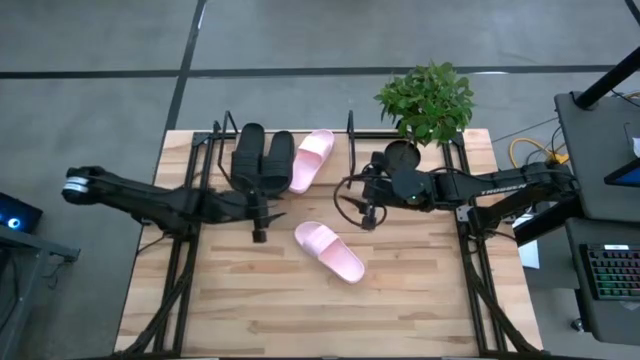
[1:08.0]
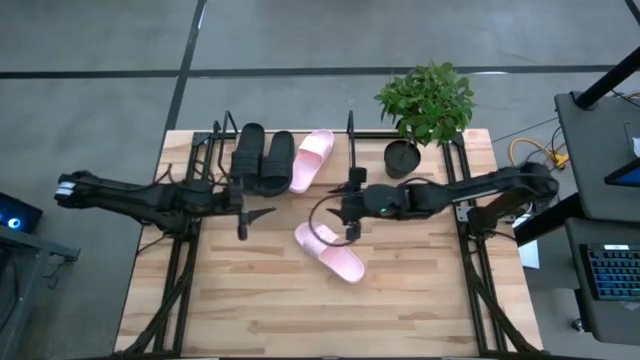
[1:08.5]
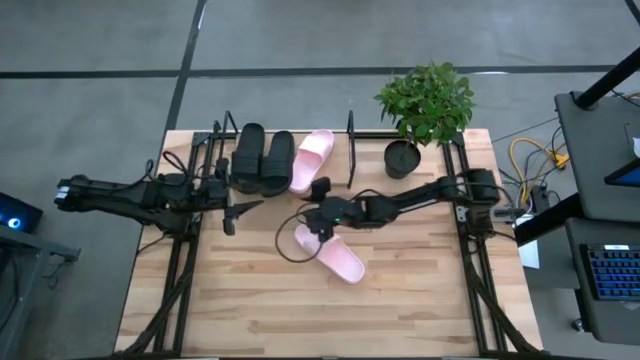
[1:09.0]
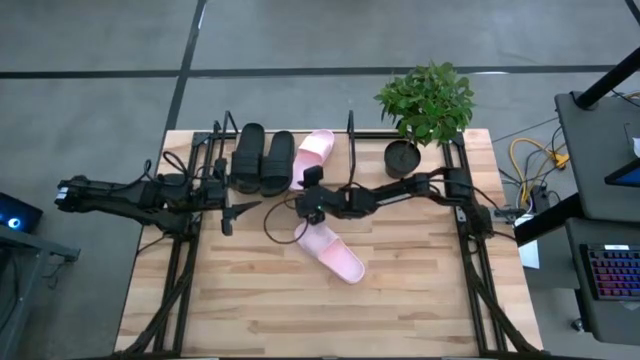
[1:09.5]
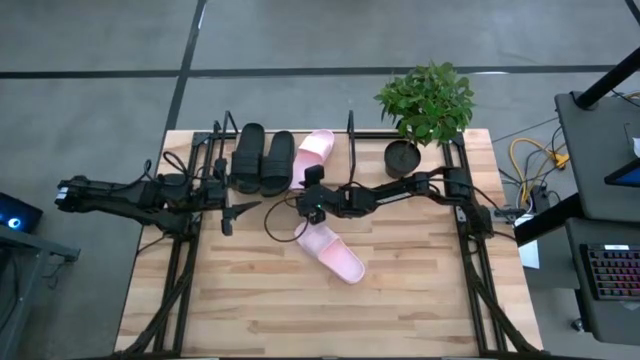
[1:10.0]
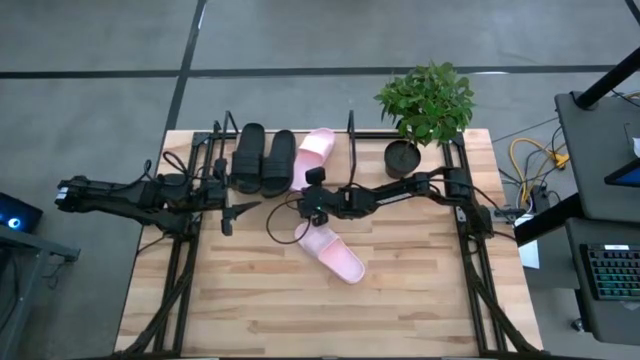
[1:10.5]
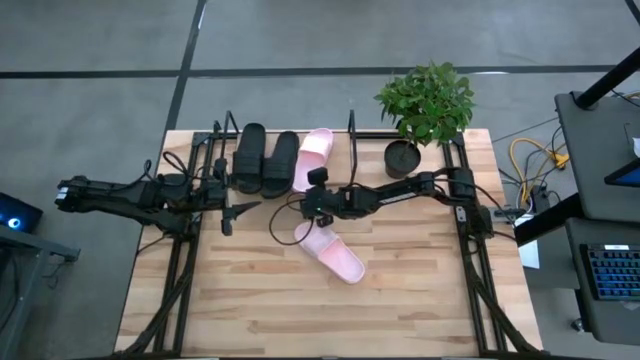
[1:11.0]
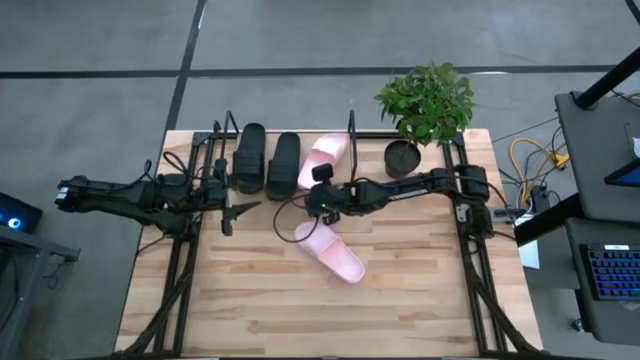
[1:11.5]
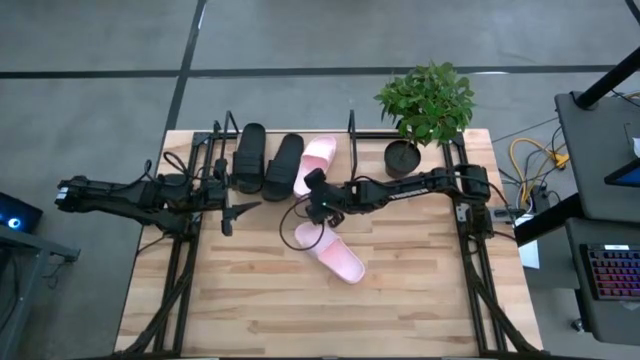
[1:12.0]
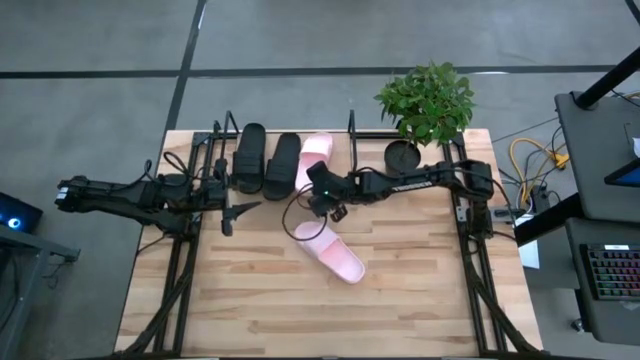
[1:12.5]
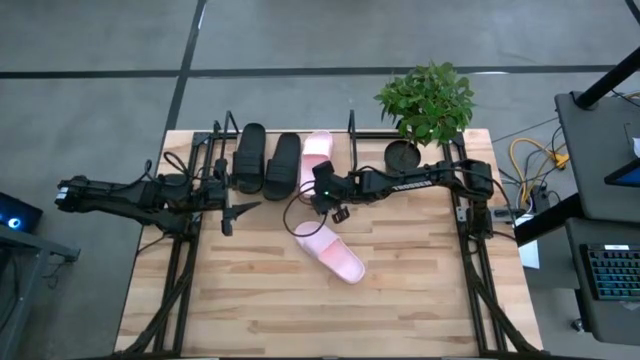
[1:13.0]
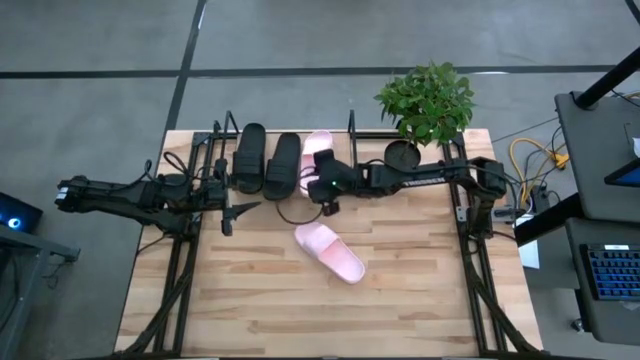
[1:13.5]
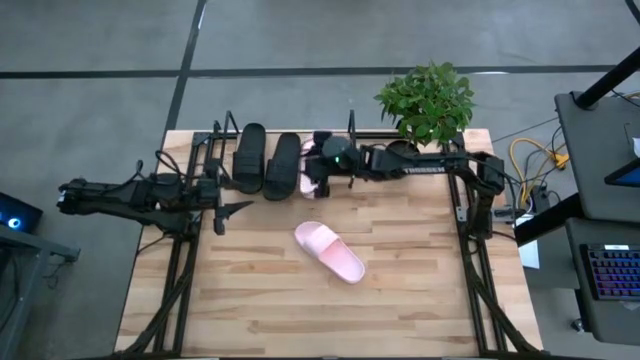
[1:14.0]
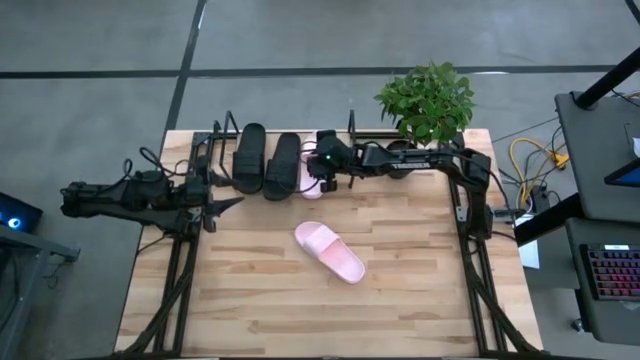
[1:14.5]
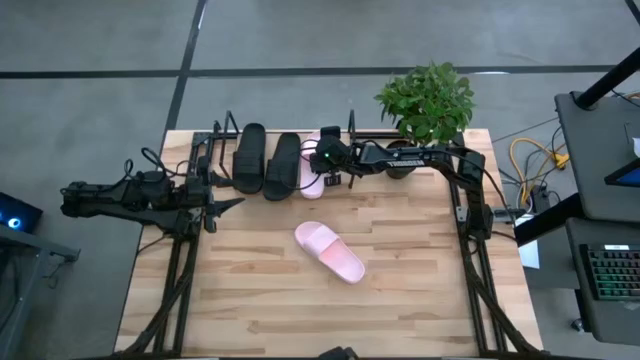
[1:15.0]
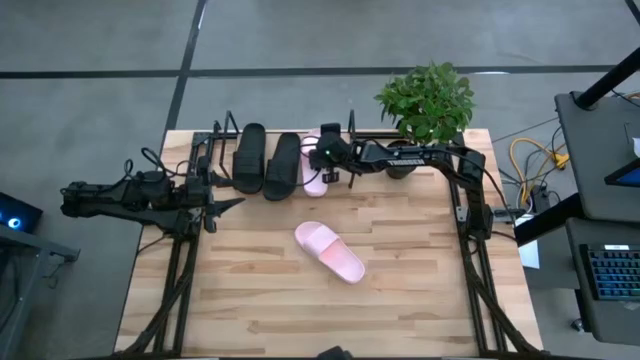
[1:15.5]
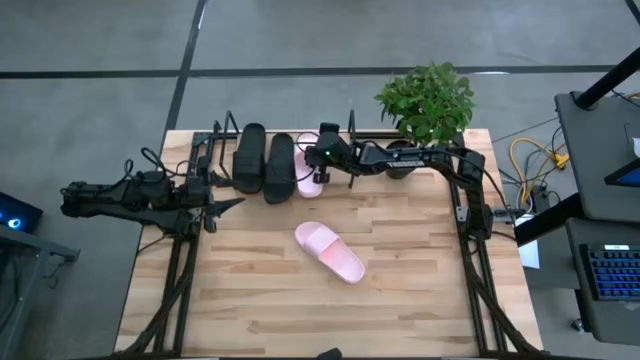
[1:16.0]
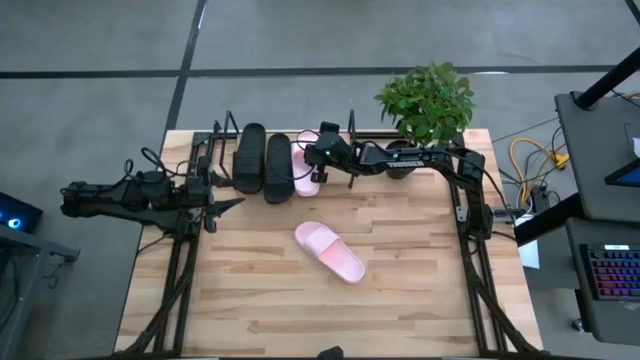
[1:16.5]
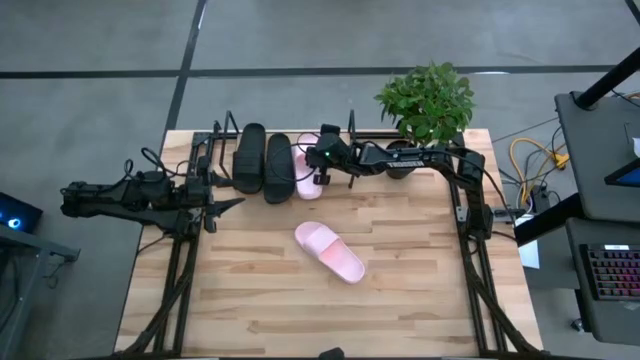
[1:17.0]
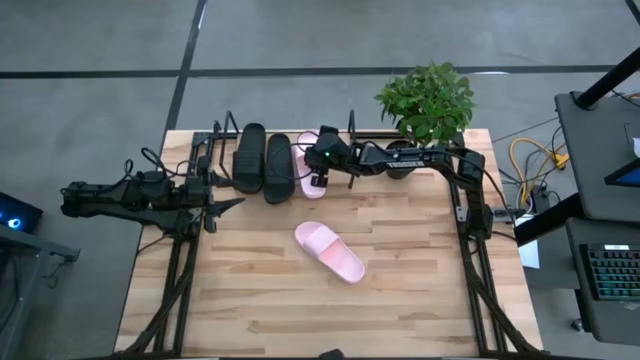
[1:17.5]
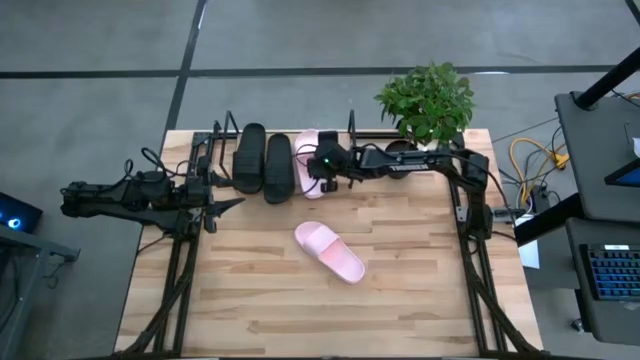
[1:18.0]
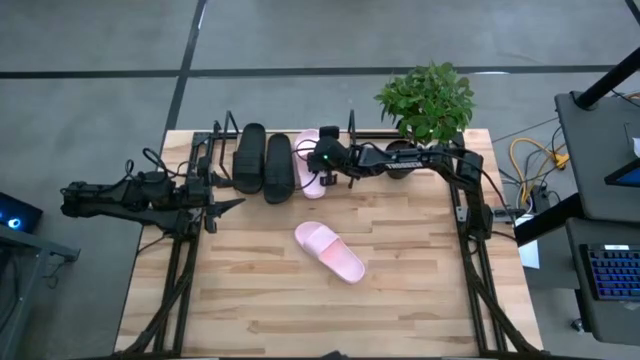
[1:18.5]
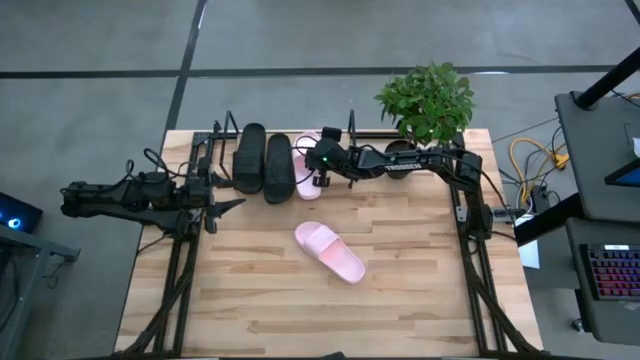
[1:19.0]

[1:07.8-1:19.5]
Task: Pick and place slides into the shelf
Adjust the pink slipper on the shelf

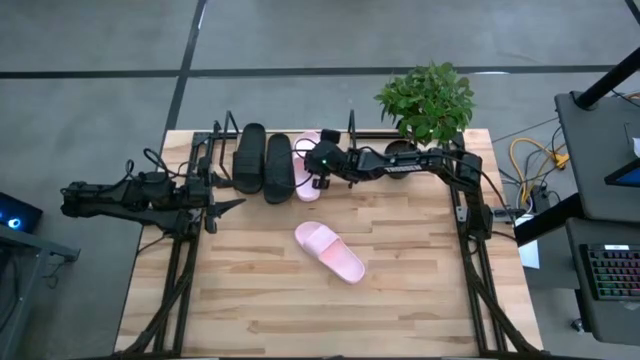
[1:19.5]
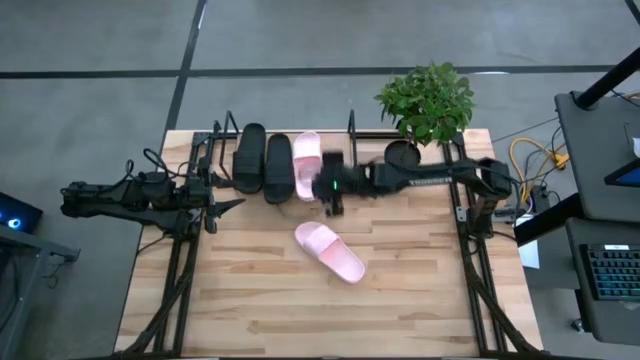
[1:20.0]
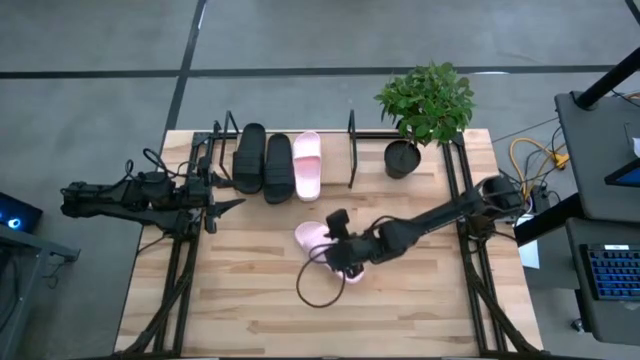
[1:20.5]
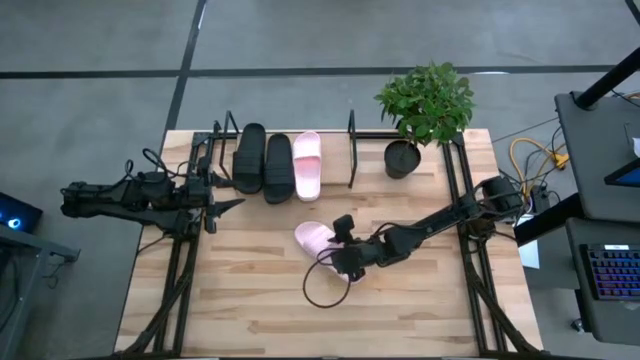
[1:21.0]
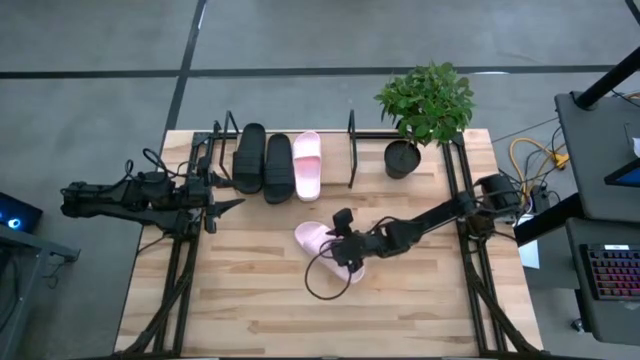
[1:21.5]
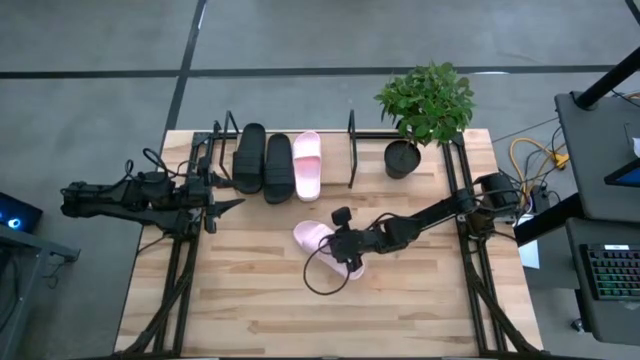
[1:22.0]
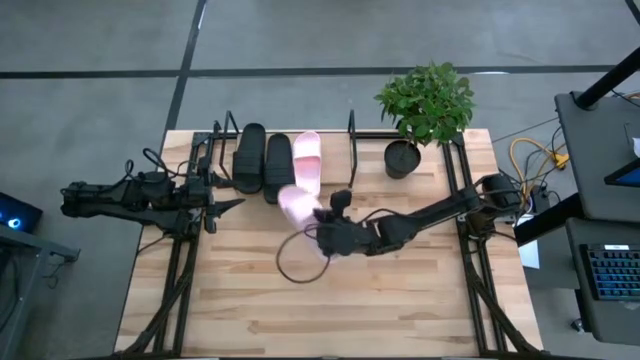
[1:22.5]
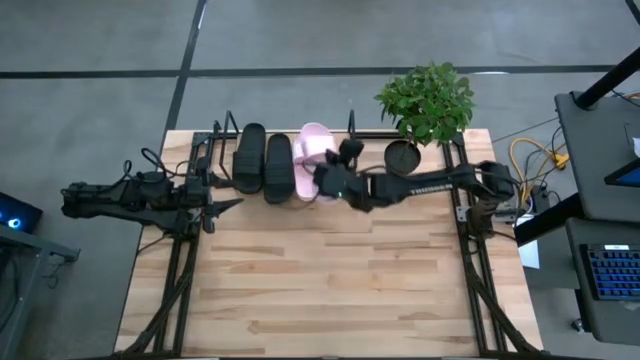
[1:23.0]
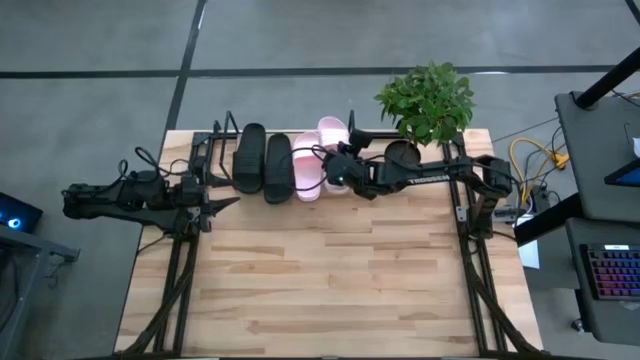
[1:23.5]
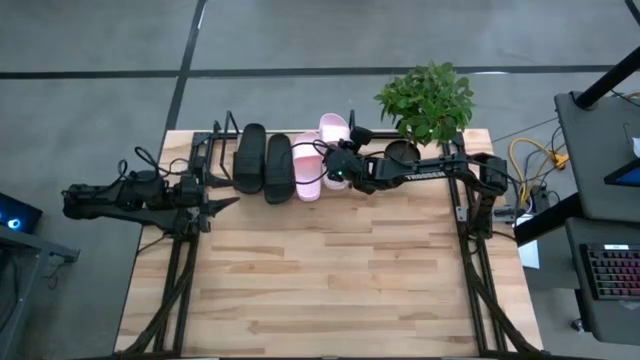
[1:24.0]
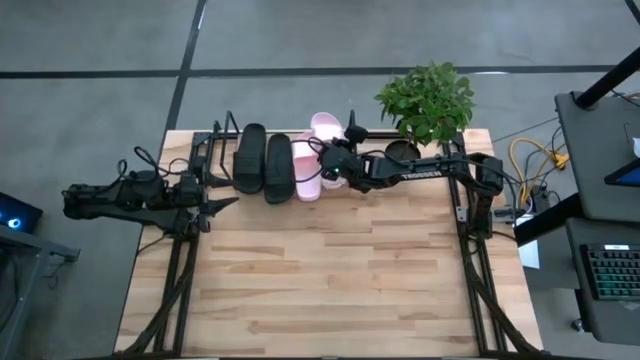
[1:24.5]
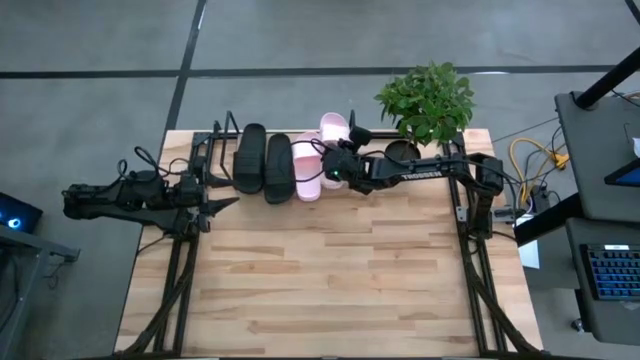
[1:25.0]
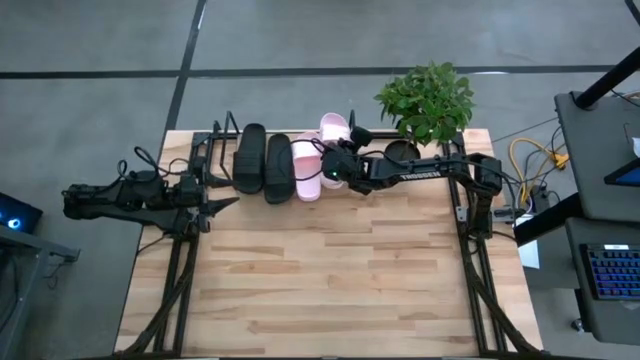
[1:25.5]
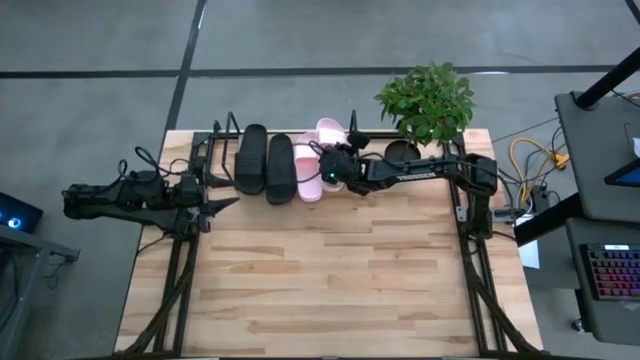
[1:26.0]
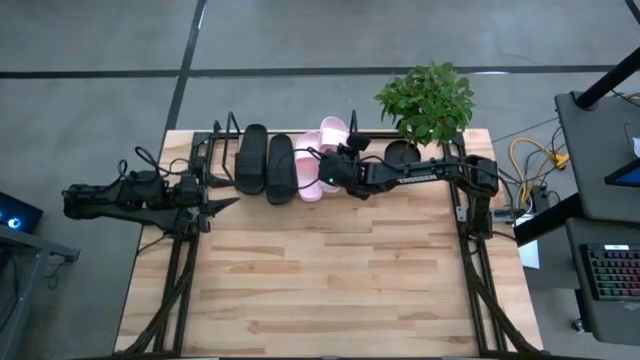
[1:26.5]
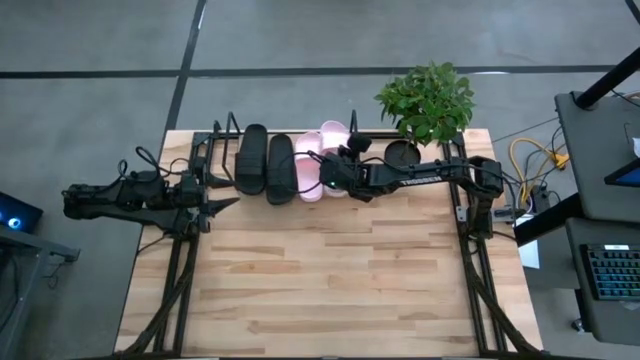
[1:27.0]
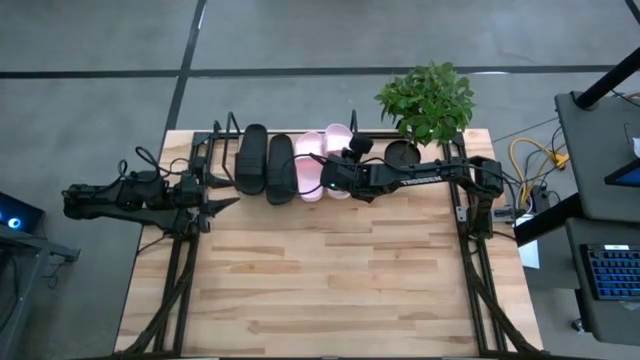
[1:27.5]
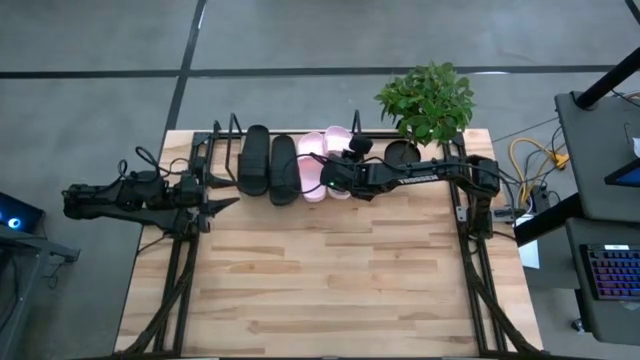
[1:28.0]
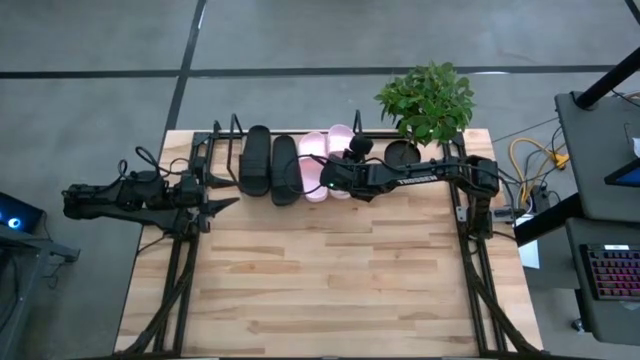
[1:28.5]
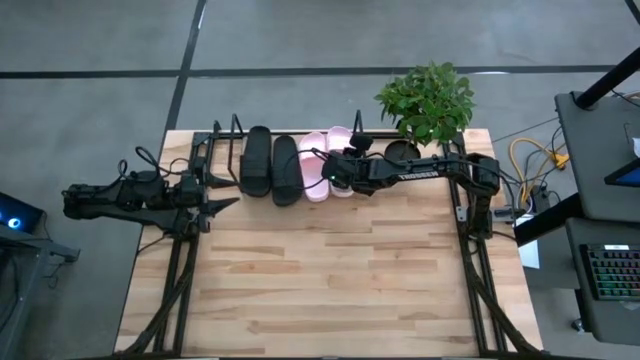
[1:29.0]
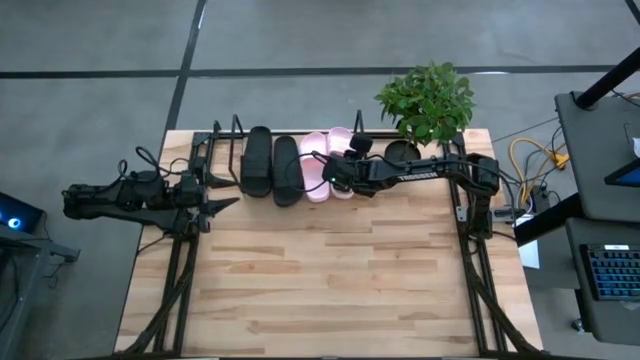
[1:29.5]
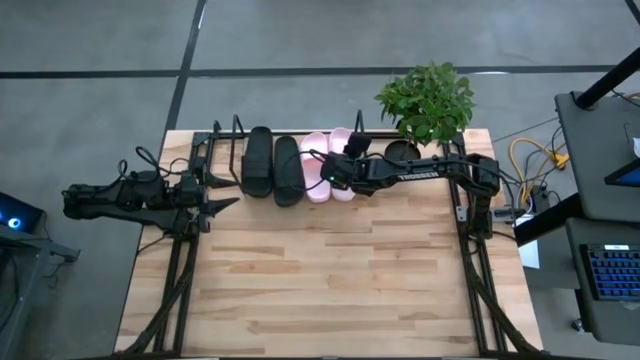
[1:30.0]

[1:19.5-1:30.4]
Put the pink slipper on the shelf

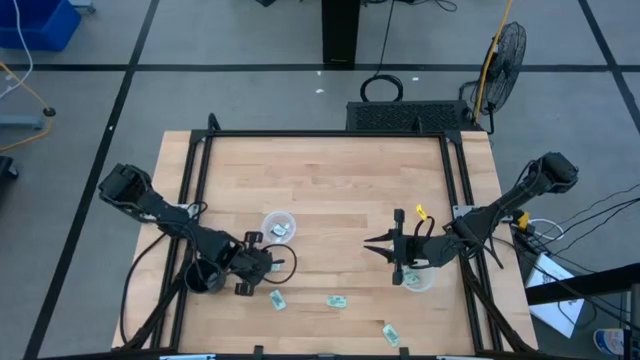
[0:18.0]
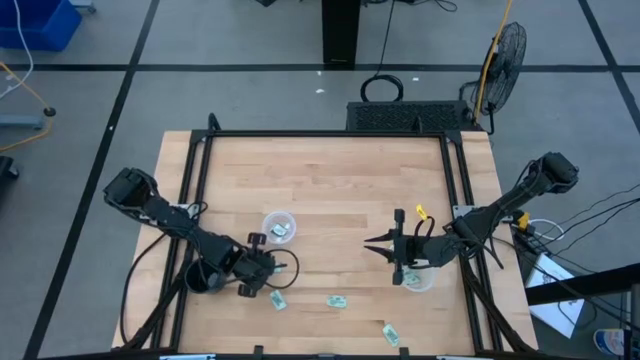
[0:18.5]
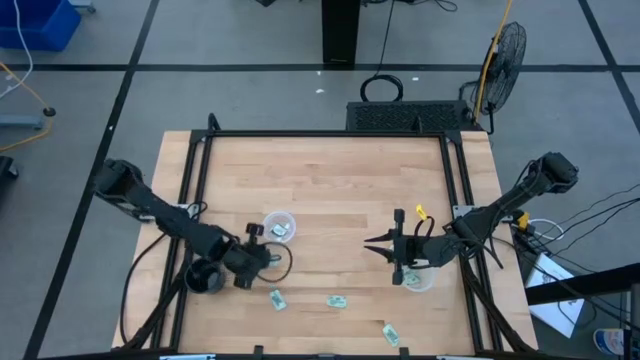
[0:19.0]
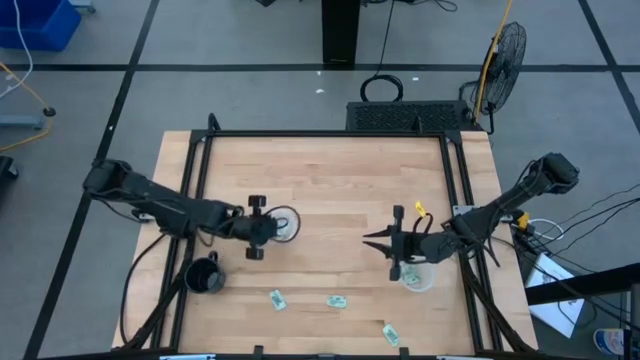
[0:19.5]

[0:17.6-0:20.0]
Task: Pick and place Stevia / Truvia into bins
Put the green stevia packet into the left transparent container
